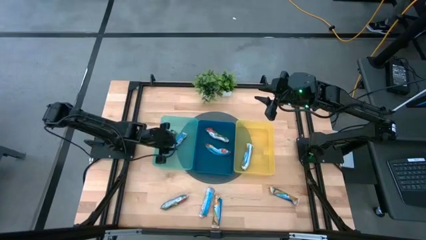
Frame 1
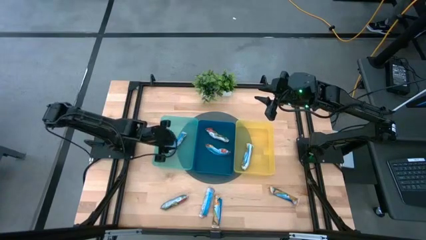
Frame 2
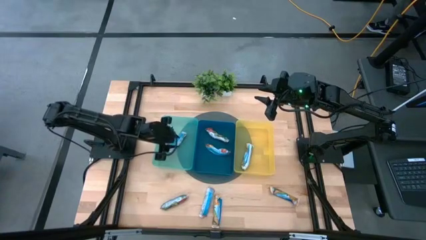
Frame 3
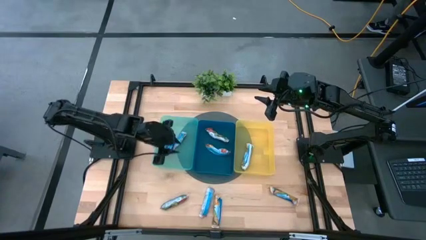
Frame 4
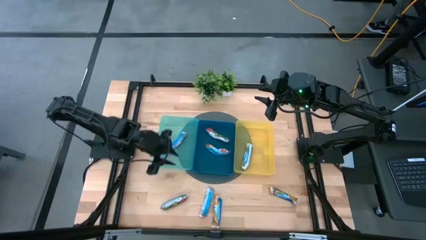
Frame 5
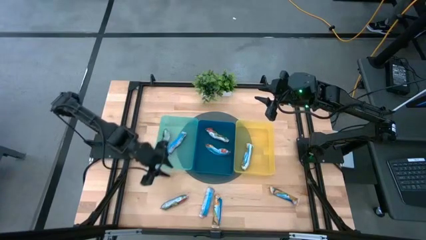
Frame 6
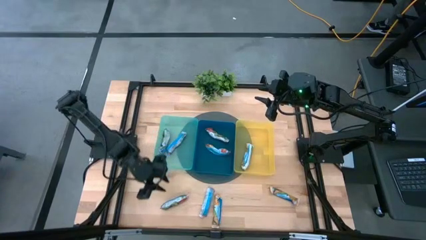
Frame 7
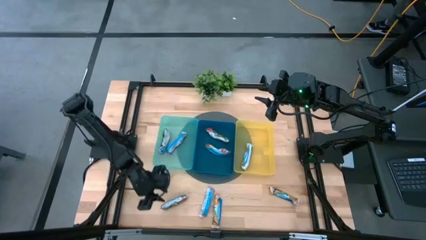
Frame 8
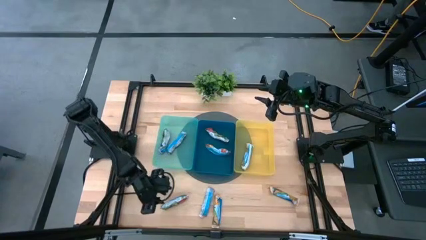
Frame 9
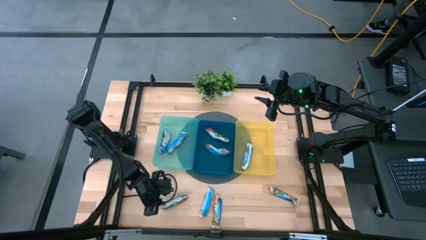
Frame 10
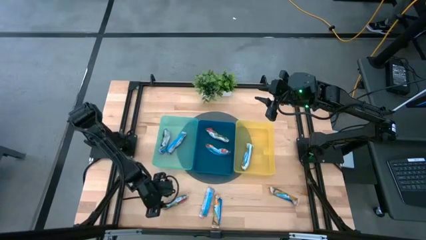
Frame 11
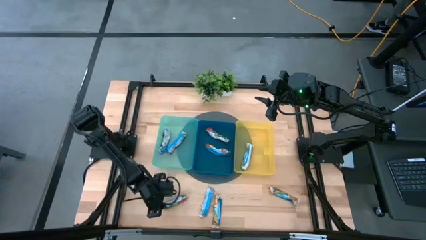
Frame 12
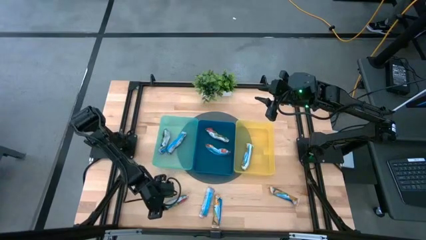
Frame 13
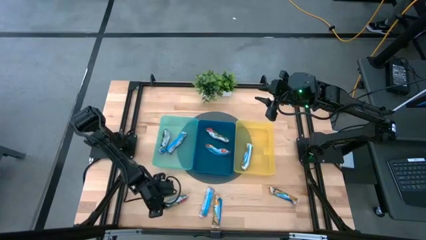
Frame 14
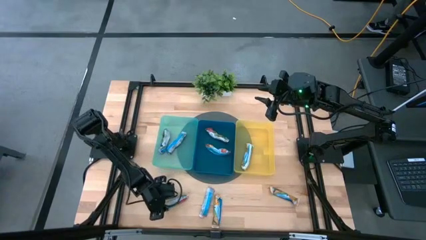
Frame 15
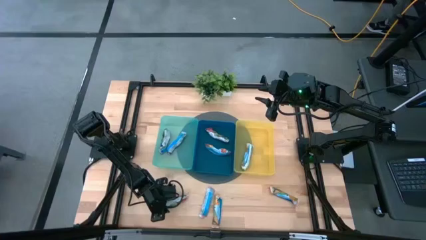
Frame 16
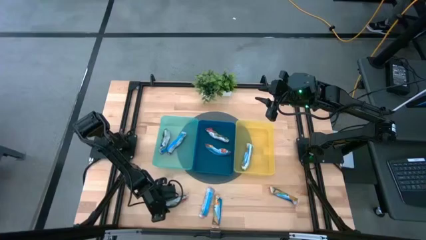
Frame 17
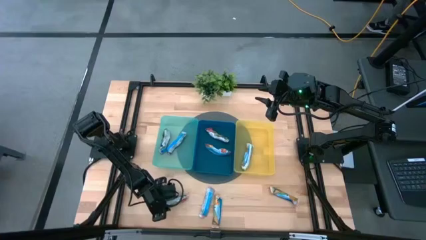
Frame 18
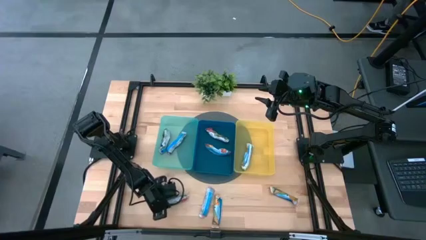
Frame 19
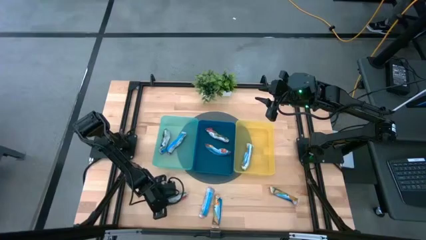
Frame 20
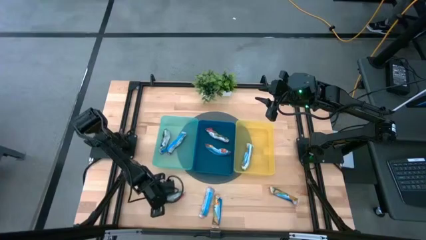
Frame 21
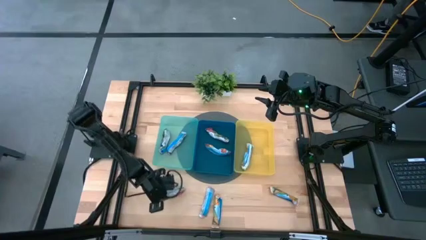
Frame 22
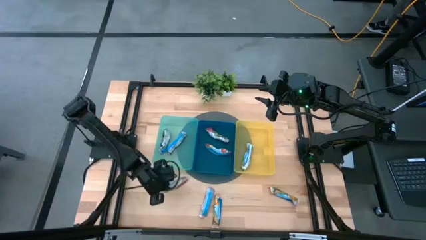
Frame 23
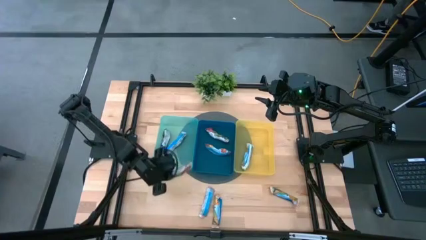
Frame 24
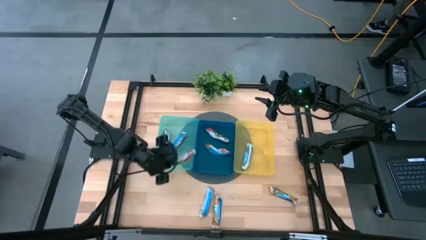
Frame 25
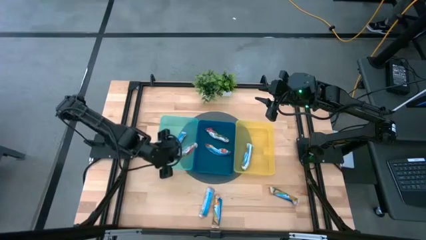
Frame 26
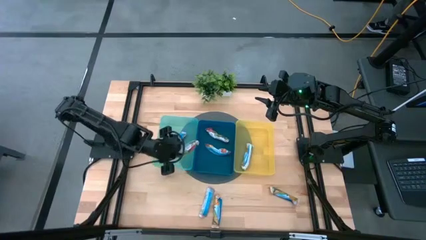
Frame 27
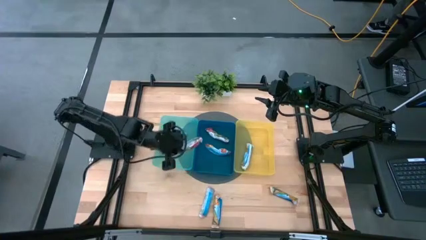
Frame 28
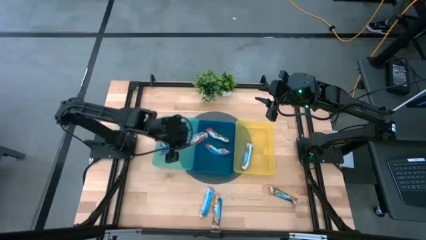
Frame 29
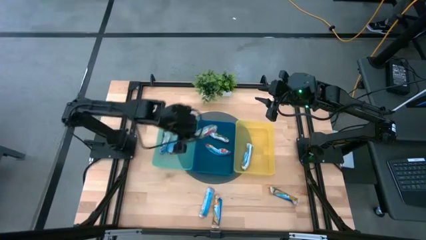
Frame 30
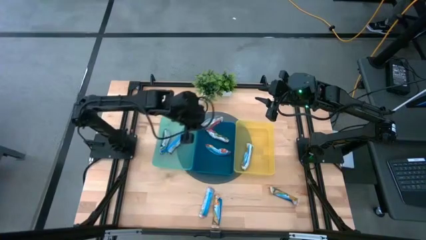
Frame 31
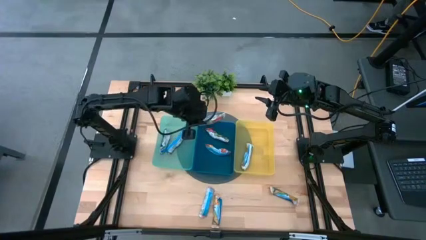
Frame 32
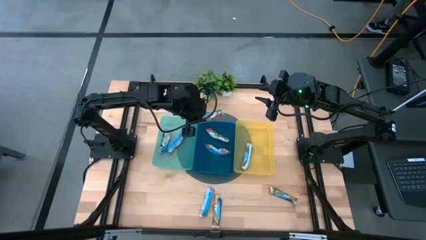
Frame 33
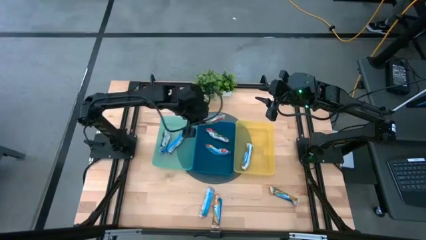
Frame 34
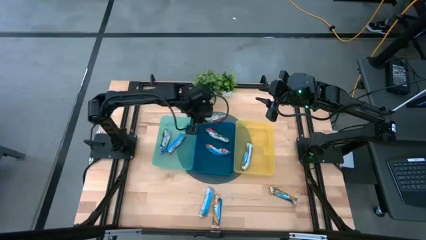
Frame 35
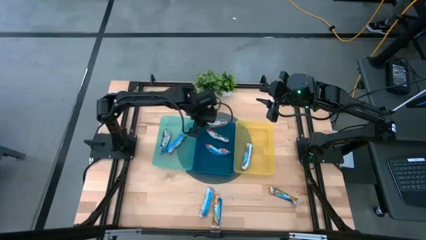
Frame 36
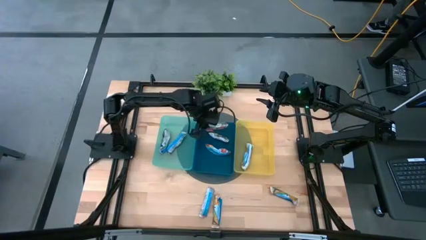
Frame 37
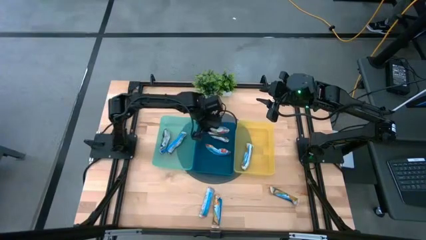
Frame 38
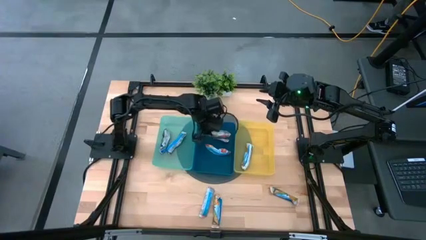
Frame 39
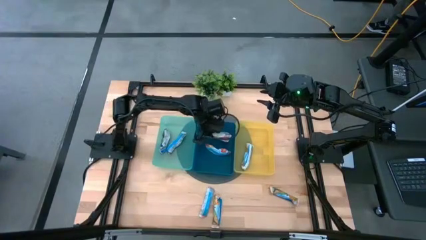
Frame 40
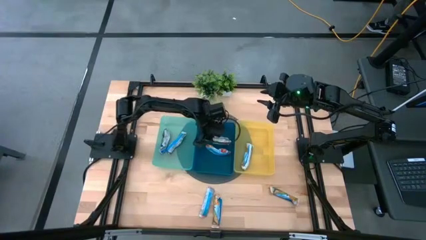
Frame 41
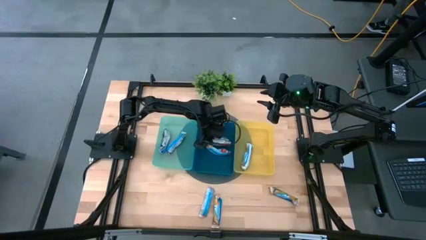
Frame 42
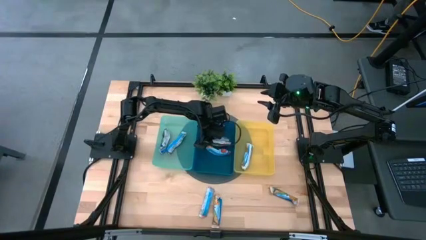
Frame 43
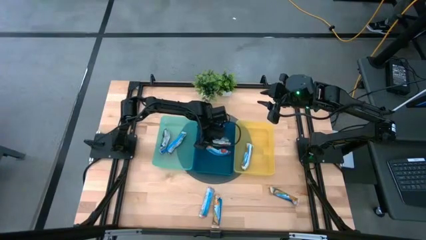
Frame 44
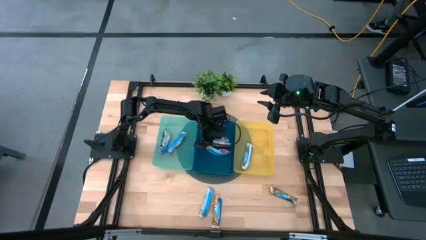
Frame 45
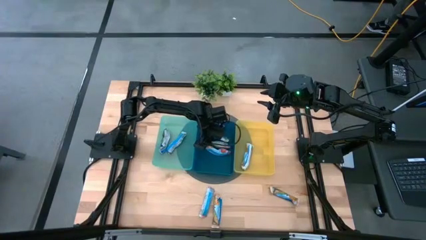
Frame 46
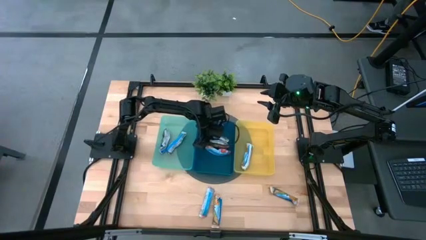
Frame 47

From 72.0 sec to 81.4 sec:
Task: Pick and place Granola Bars by type
Put the red granola bar into the blue bin

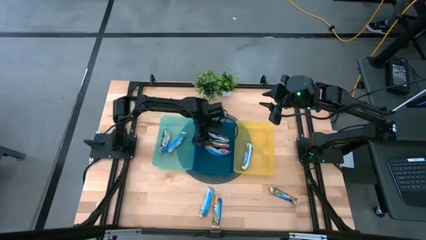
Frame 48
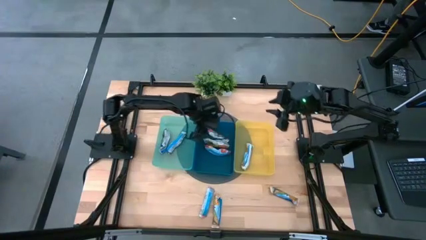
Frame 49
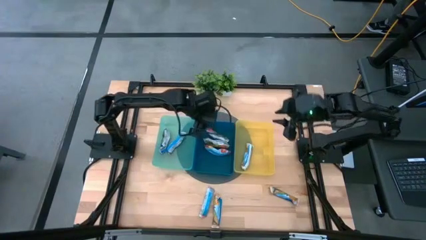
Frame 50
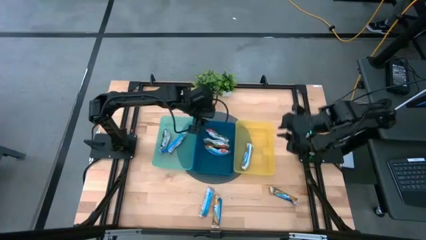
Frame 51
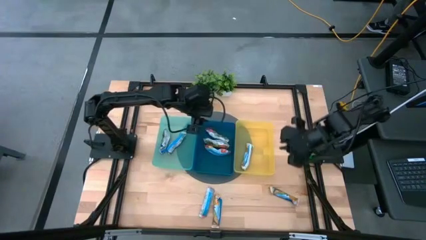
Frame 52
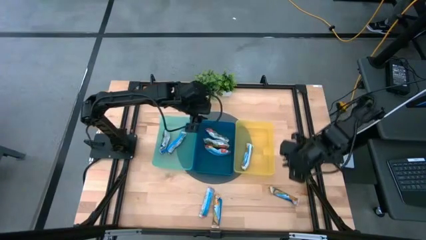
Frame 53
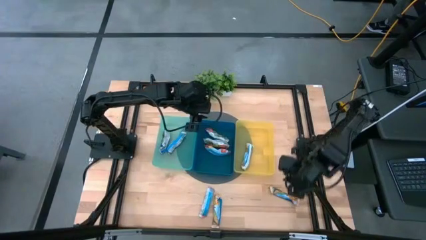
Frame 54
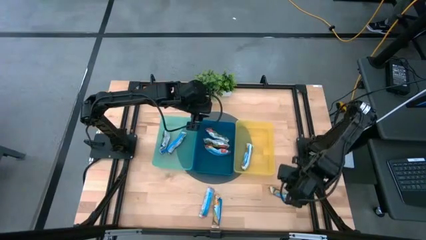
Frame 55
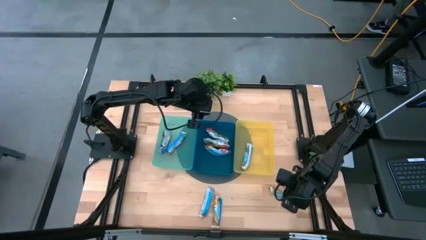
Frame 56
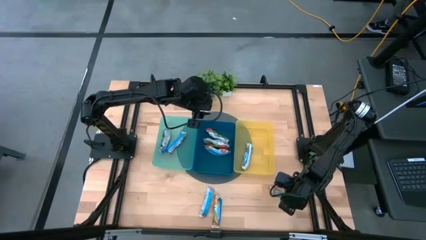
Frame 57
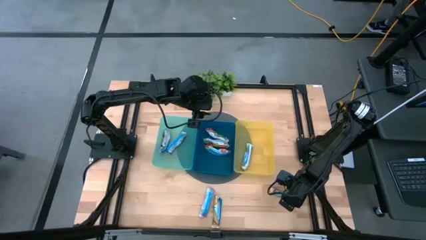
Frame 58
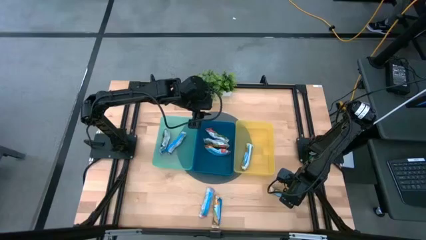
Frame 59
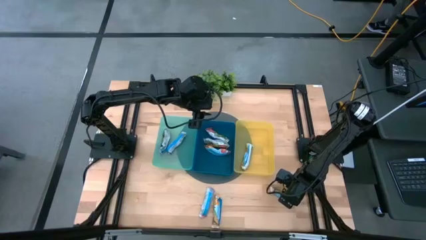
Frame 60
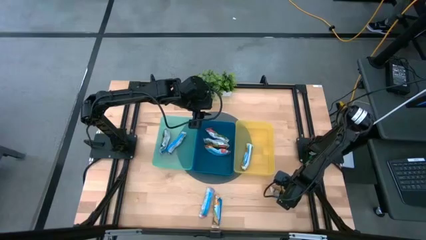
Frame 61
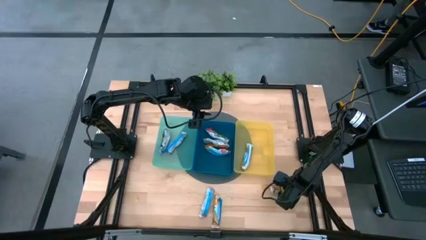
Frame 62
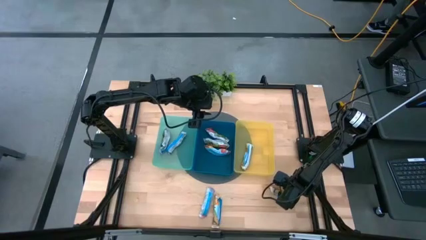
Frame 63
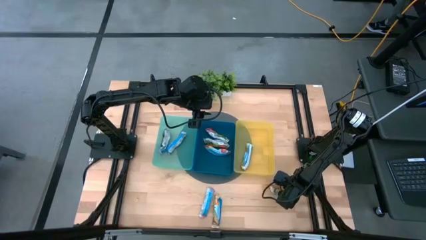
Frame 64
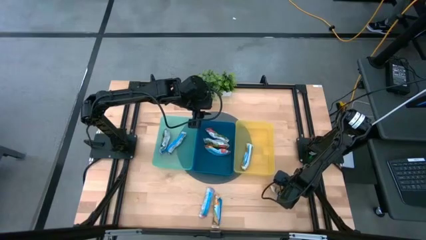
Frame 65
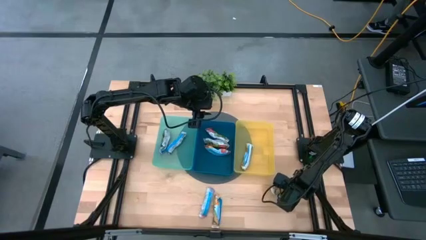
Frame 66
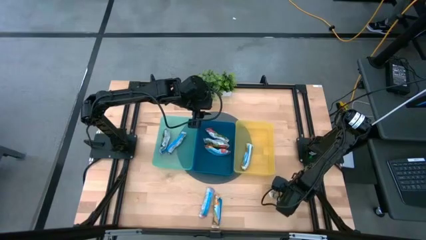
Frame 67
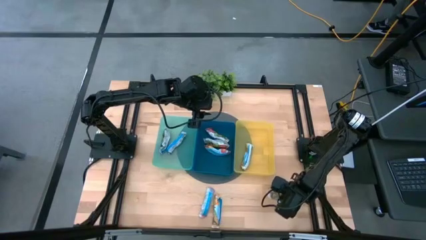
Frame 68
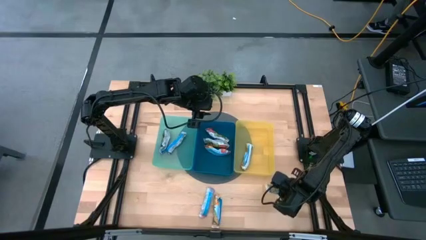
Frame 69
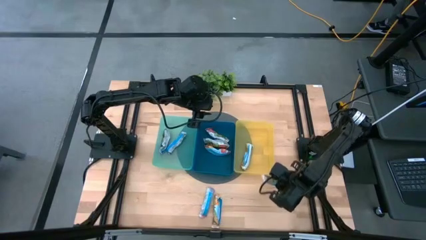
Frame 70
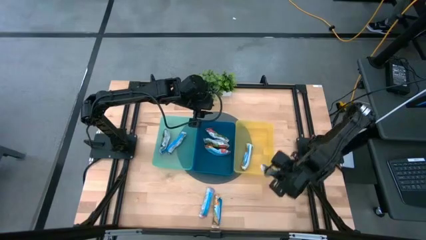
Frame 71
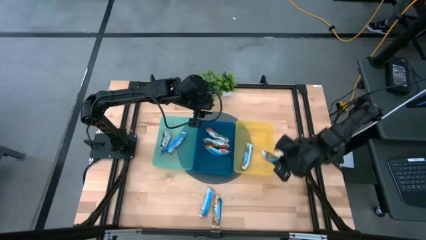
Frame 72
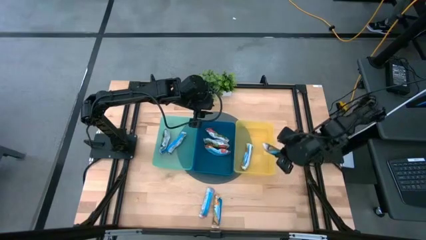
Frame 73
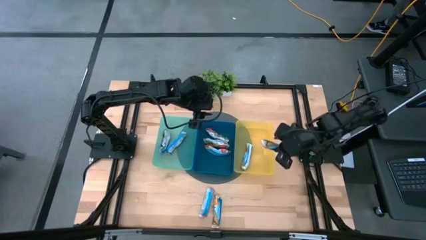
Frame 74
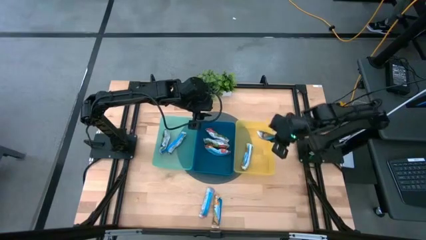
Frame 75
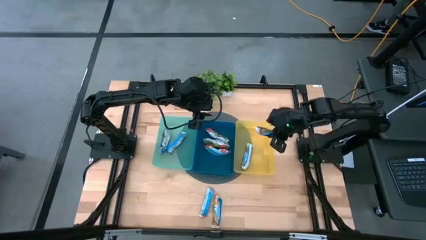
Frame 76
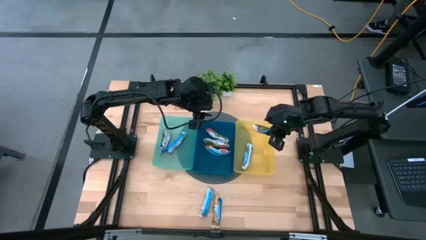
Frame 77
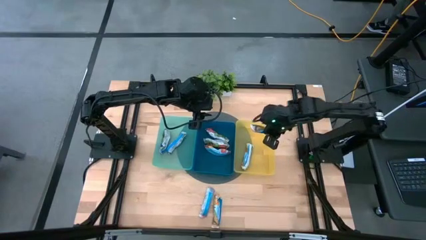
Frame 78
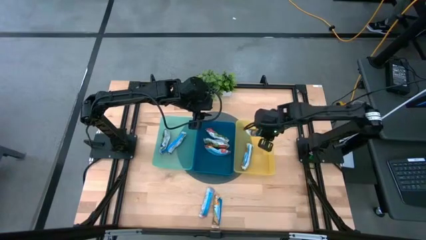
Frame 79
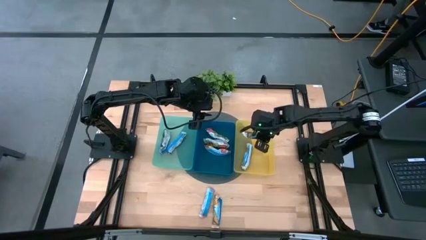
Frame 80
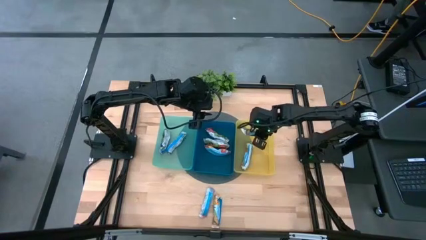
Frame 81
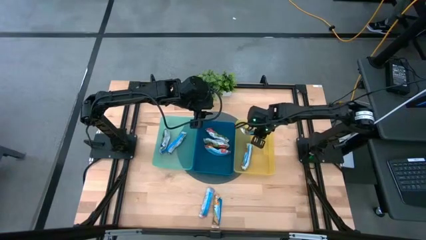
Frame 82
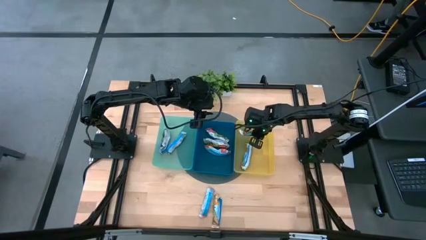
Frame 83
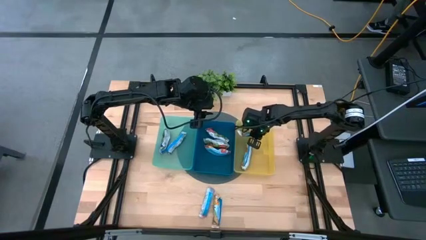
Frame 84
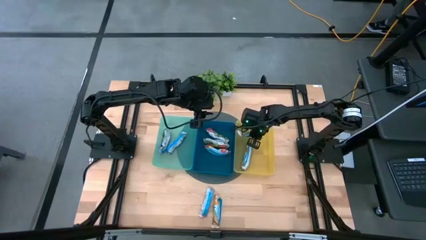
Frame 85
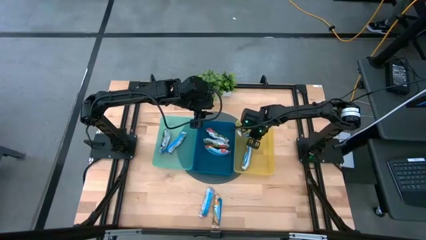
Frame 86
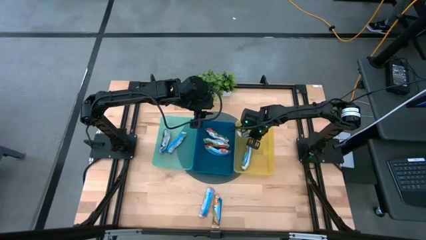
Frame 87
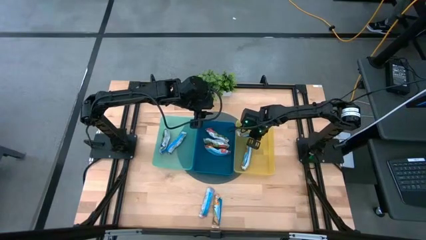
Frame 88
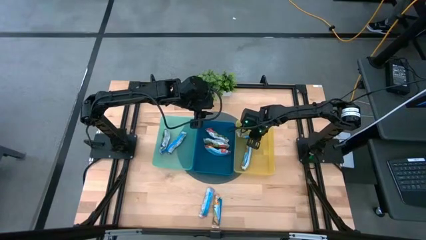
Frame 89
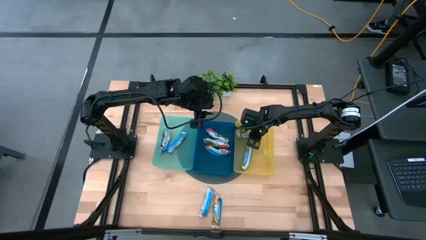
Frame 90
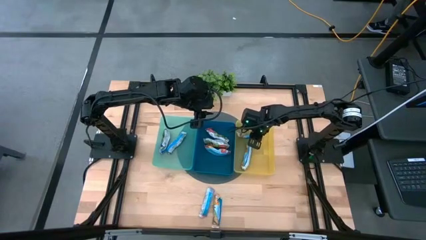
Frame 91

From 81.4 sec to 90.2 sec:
Put the yellow granola bar into the yellow bin
